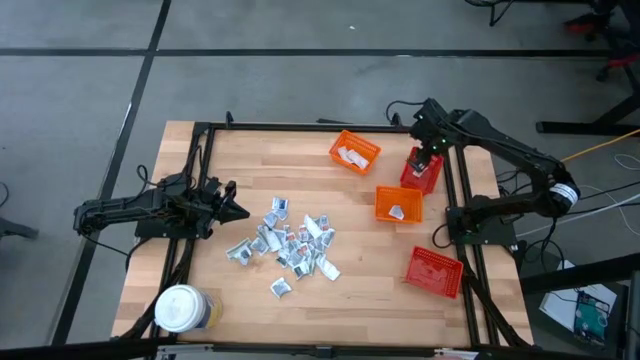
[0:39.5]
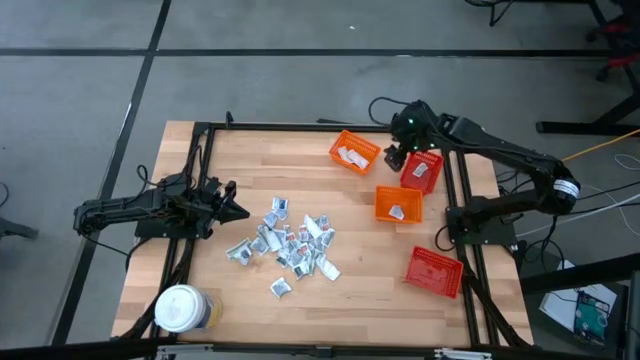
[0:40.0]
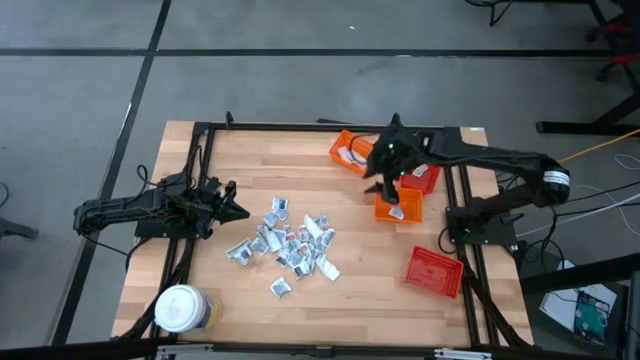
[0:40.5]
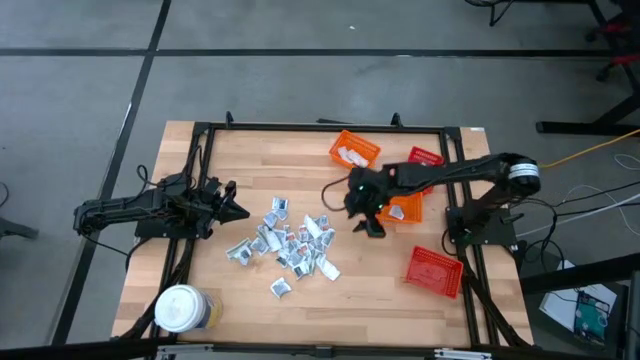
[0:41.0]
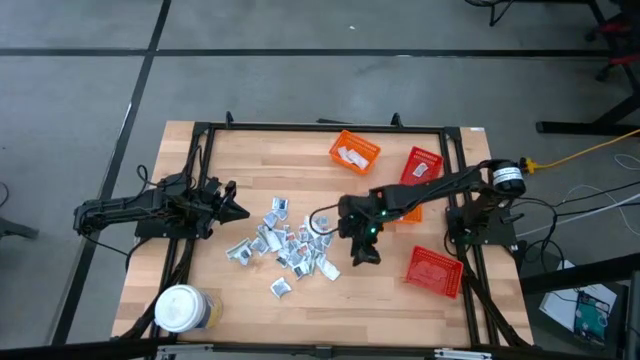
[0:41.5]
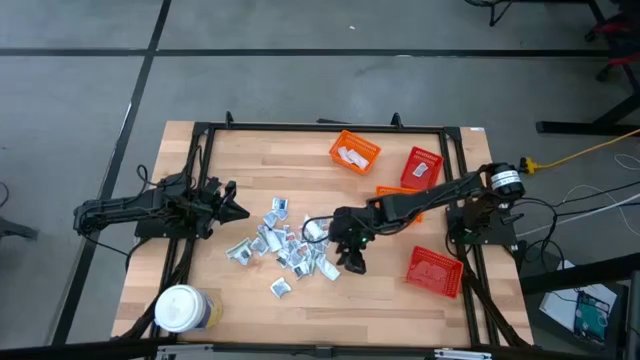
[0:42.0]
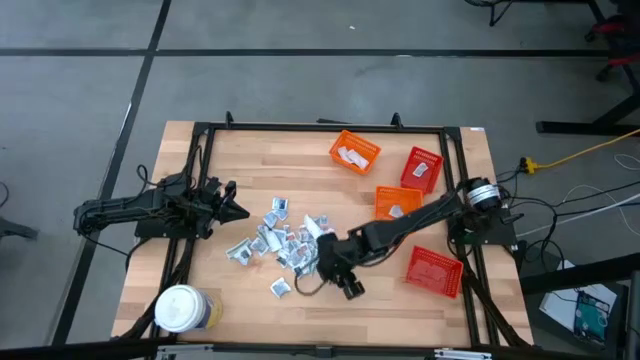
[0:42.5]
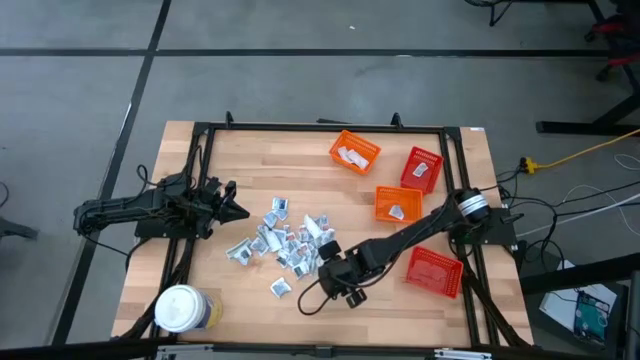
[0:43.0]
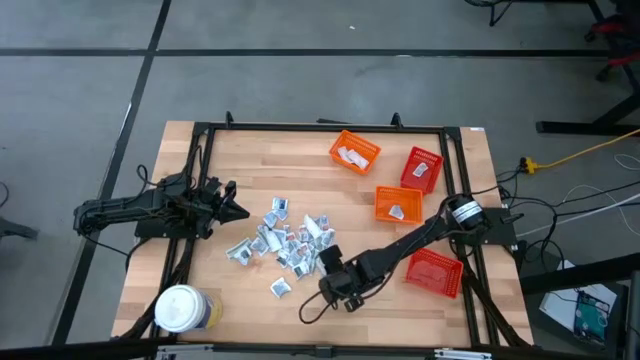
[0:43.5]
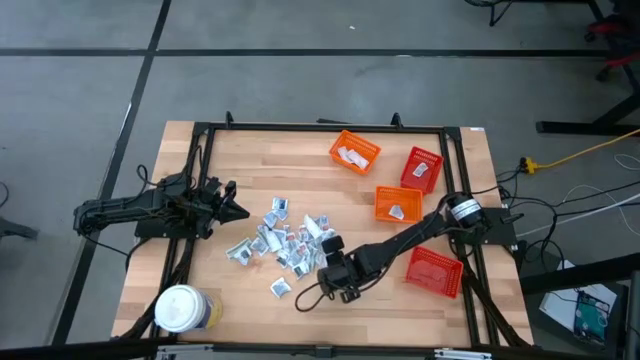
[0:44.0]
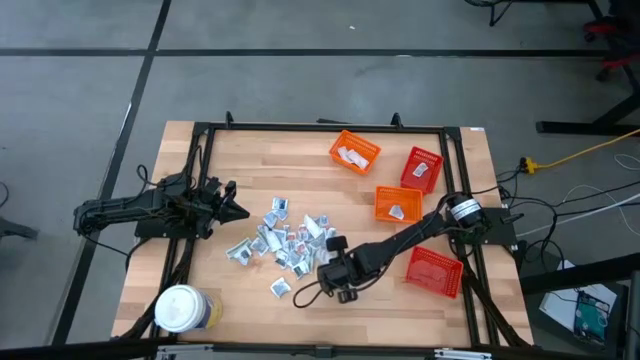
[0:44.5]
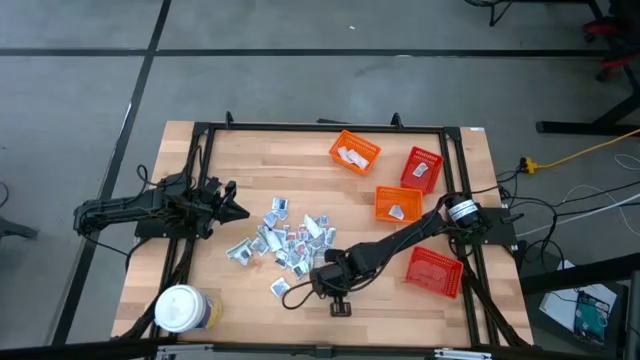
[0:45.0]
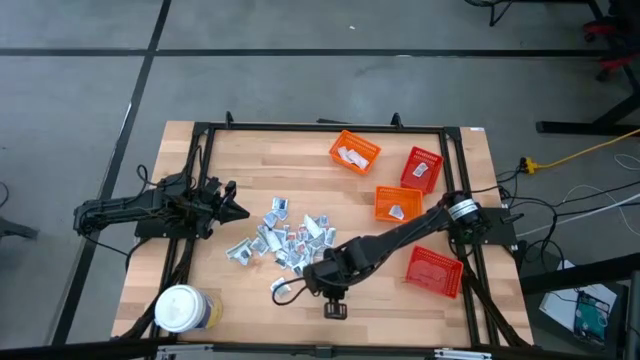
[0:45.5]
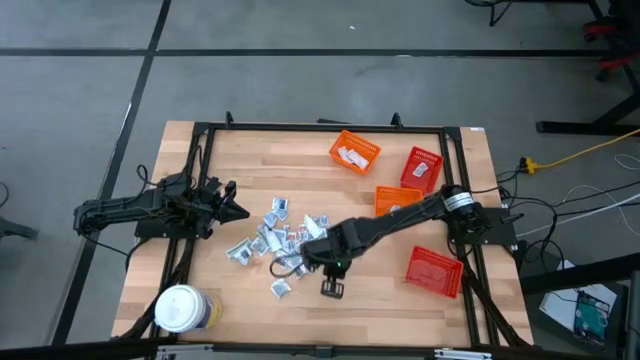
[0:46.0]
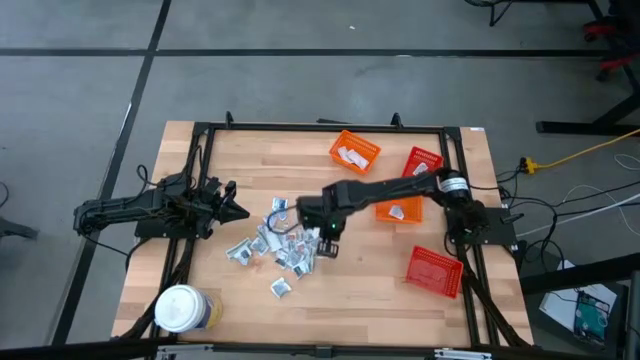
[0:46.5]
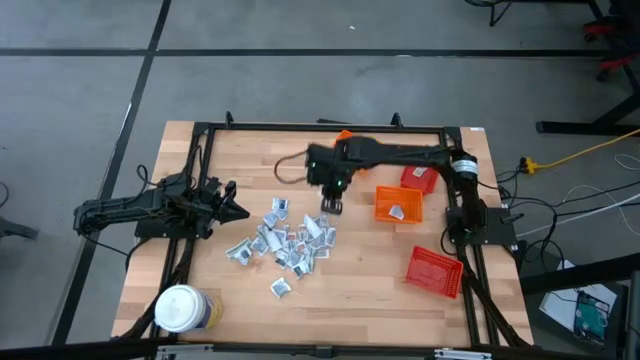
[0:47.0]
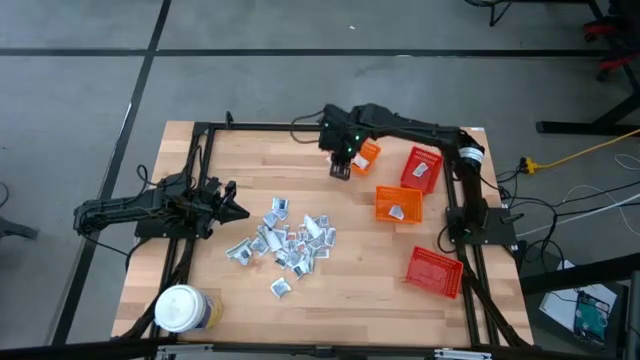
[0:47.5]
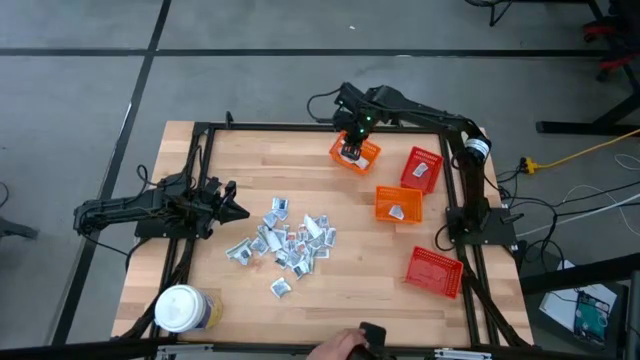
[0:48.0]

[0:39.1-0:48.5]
Task: Pick & Place First Aid Supplies
Put the green bandage pack into the top orange bin

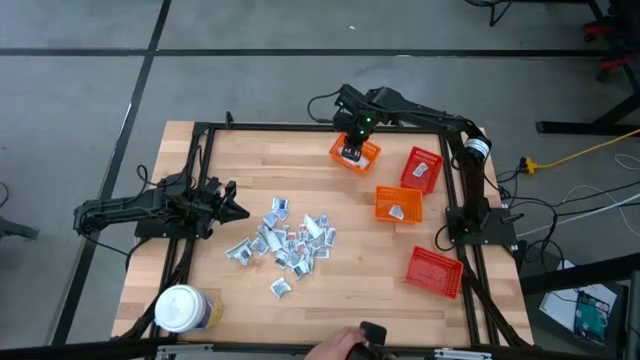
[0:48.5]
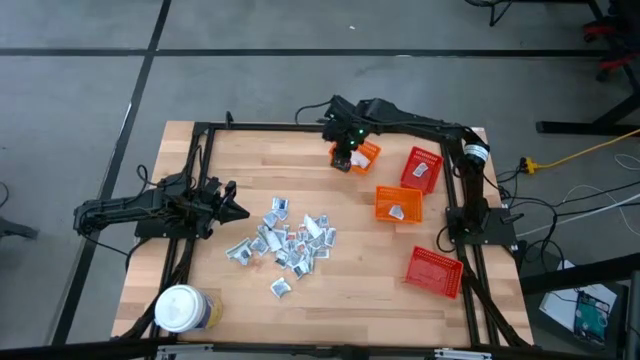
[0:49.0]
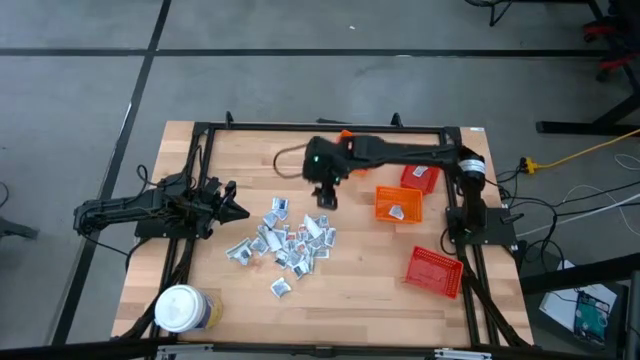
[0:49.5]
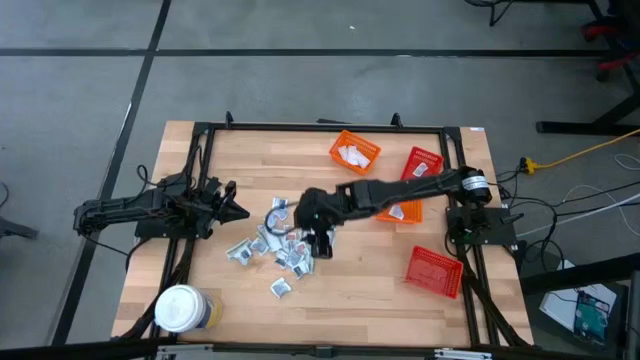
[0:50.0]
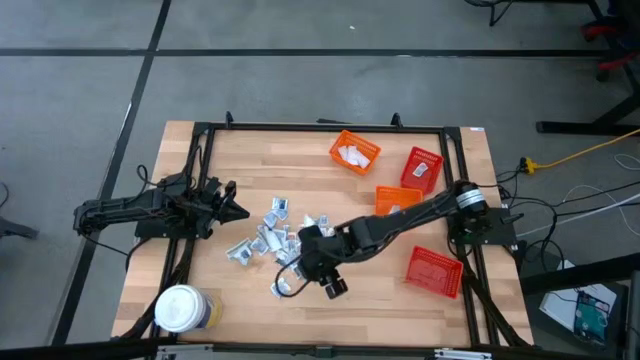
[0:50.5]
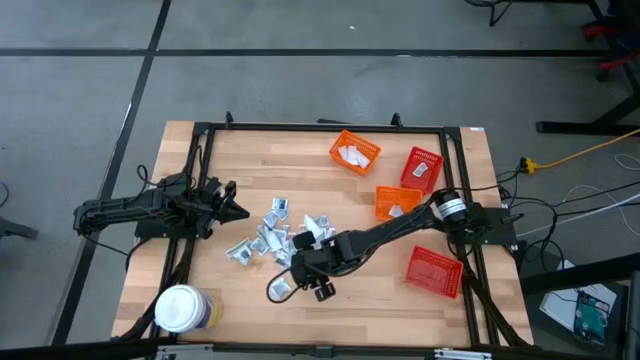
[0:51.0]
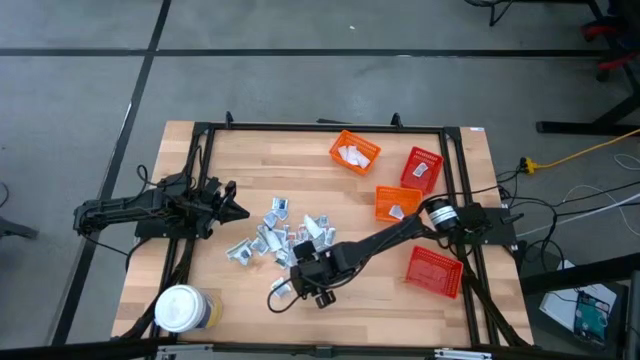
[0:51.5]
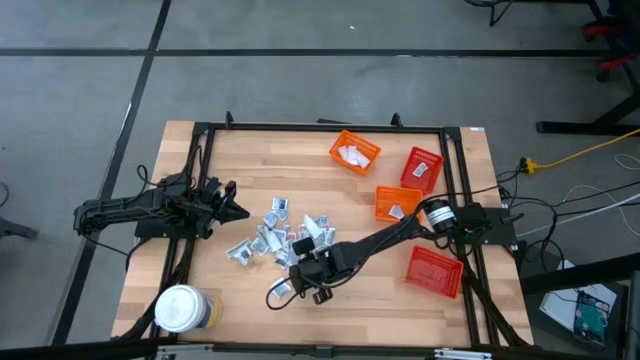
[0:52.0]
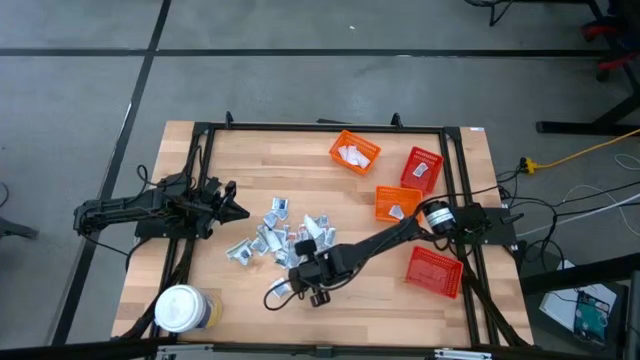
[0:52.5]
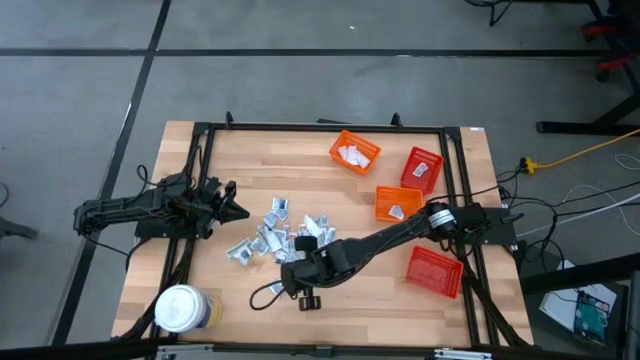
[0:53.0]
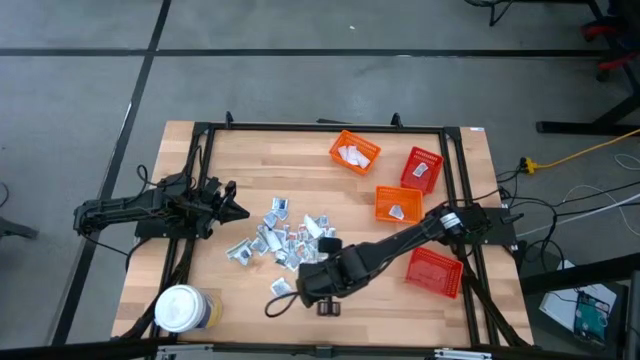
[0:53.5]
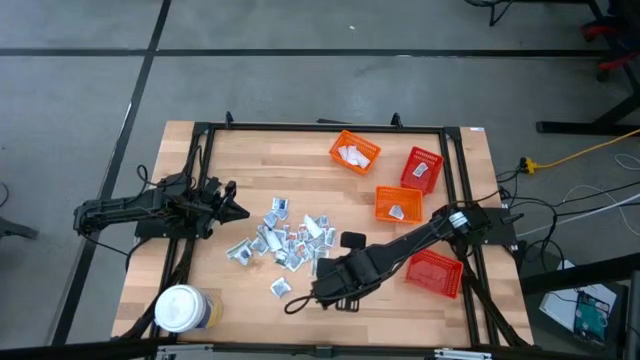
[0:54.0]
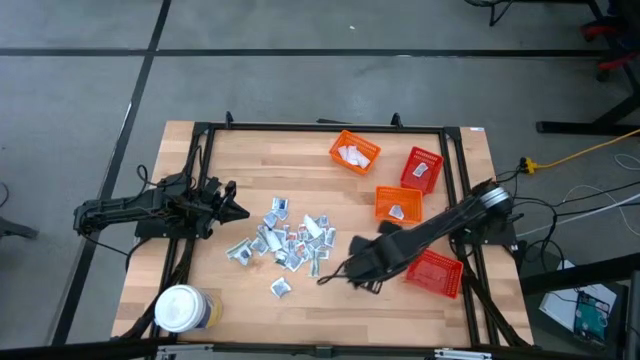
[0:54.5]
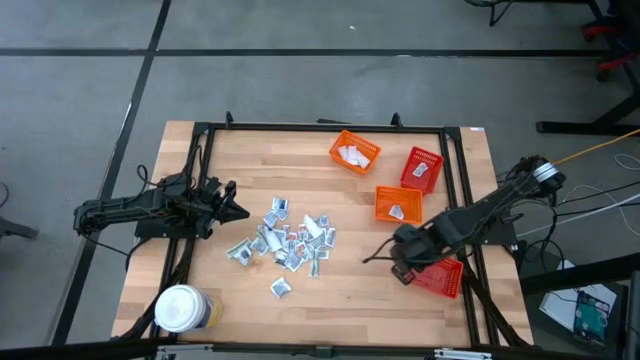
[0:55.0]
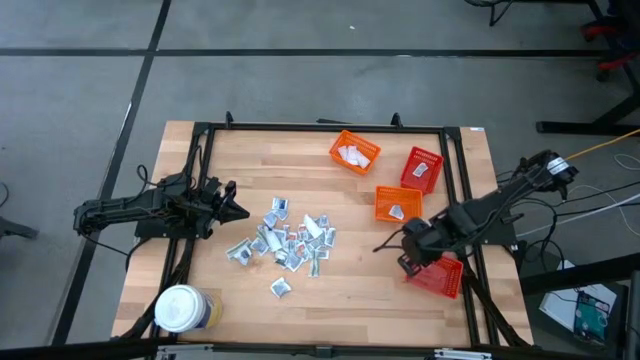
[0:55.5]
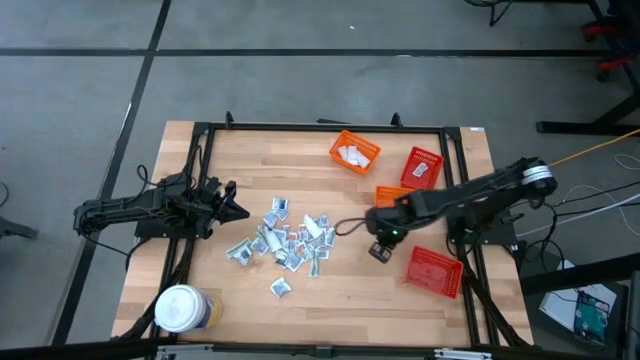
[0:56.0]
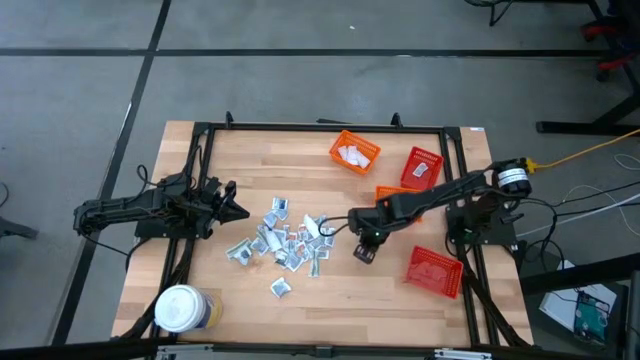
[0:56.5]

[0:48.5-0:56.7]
Move the gray towelette pack to the middle right of the table

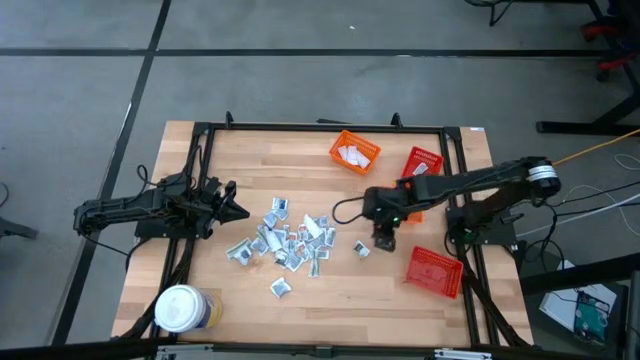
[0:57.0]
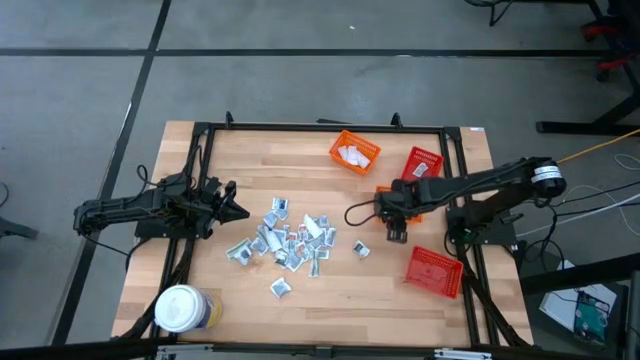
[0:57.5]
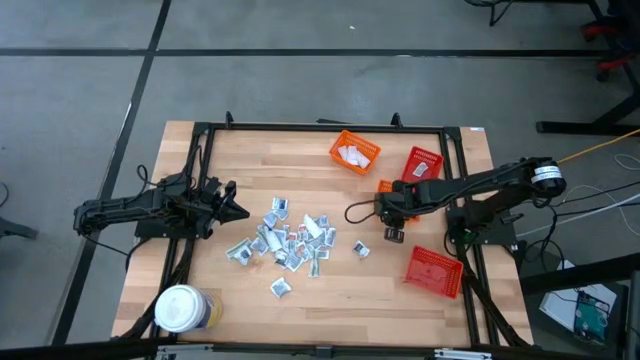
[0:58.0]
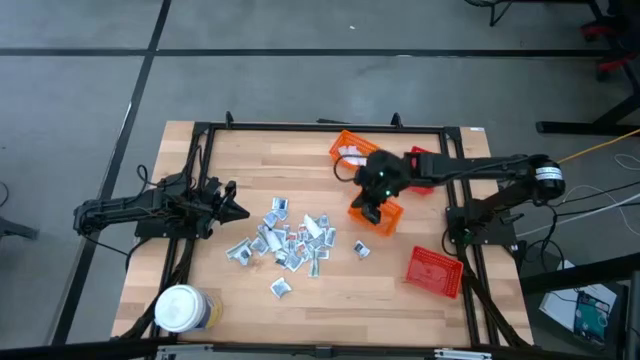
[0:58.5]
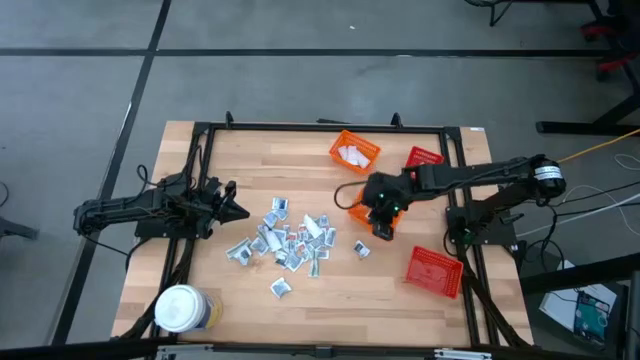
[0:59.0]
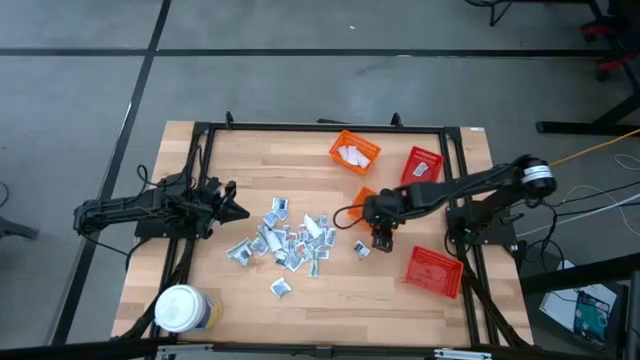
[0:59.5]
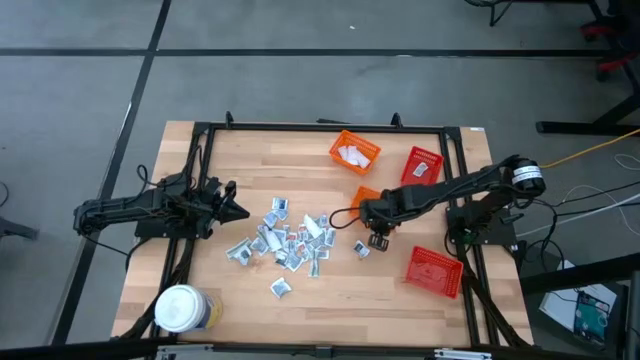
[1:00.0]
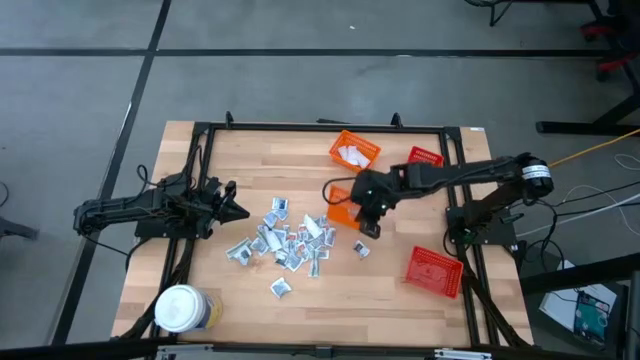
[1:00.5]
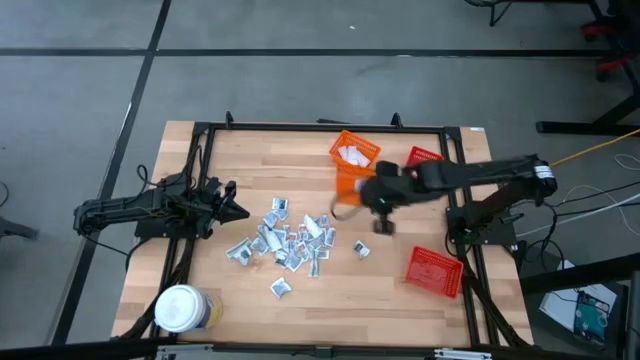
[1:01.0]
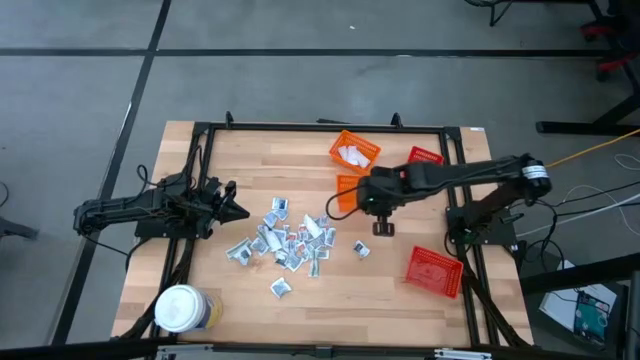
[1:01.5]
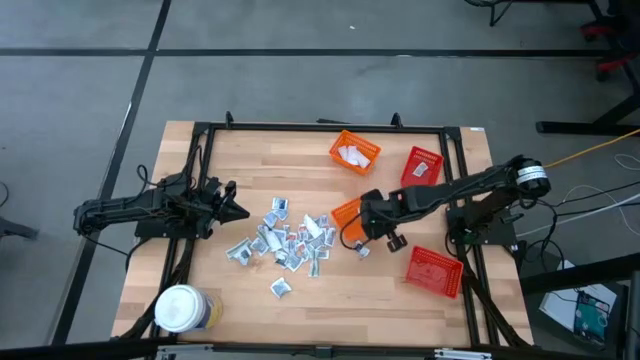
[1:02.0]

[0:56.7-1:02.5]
Adjust the bottom orange bin
